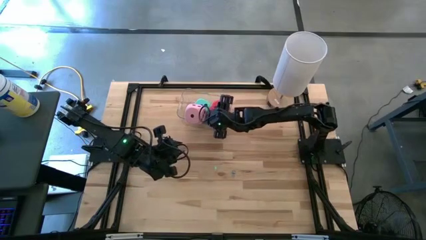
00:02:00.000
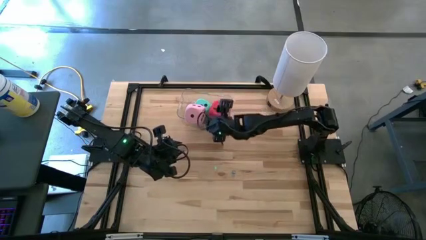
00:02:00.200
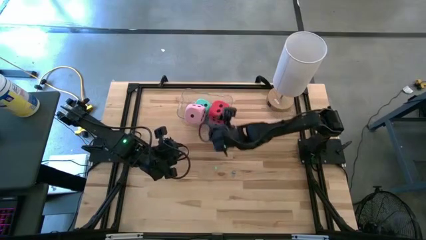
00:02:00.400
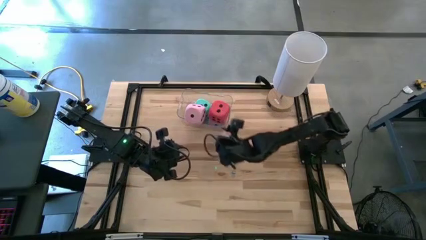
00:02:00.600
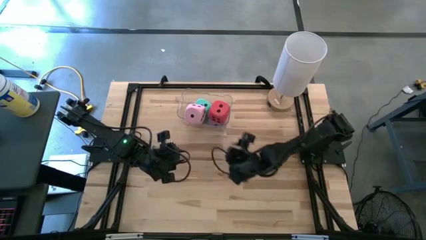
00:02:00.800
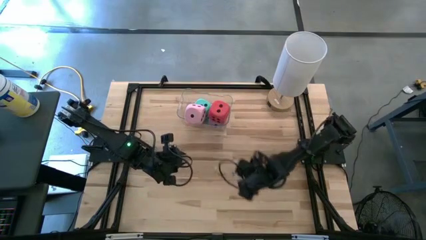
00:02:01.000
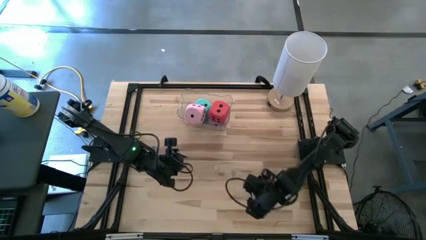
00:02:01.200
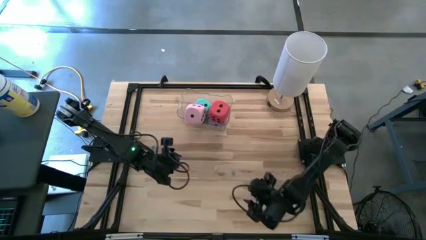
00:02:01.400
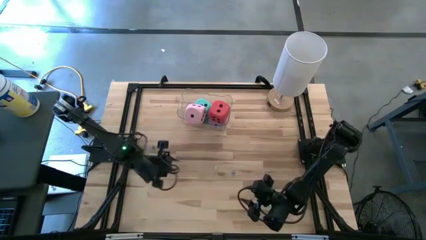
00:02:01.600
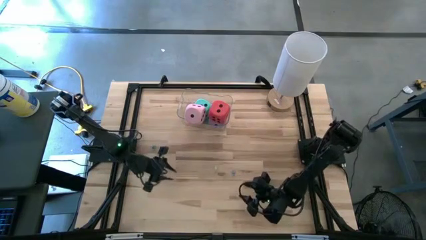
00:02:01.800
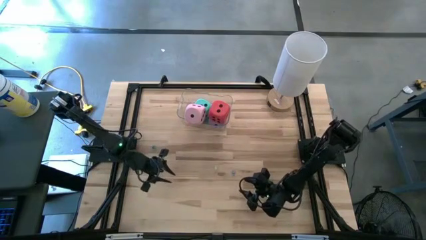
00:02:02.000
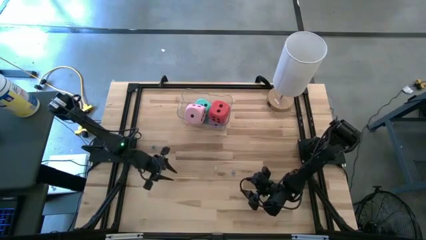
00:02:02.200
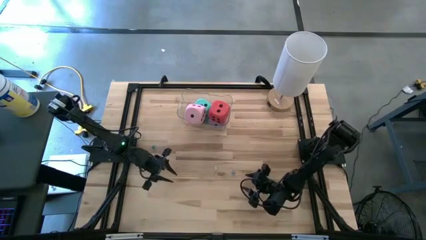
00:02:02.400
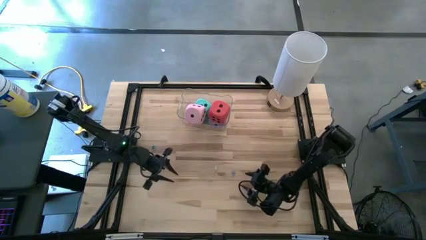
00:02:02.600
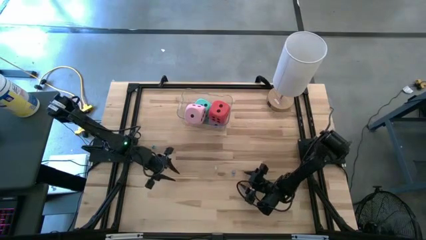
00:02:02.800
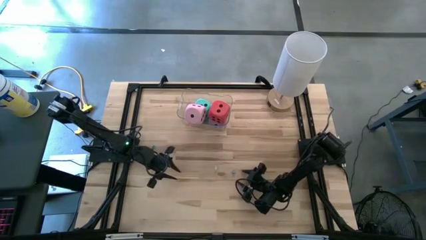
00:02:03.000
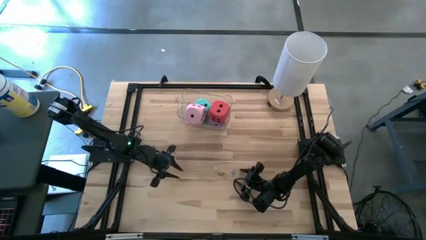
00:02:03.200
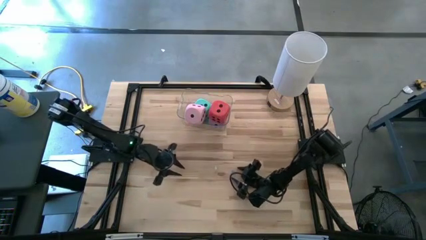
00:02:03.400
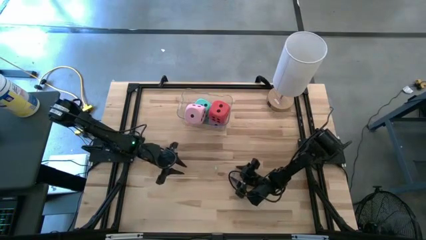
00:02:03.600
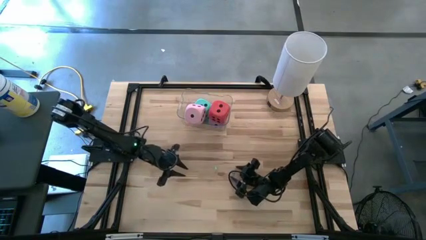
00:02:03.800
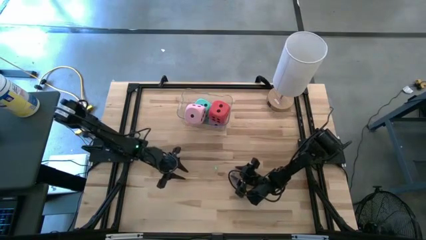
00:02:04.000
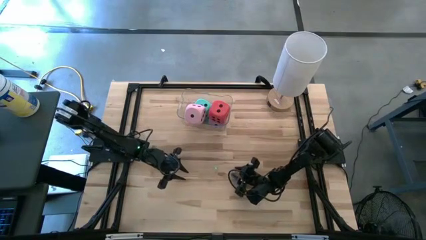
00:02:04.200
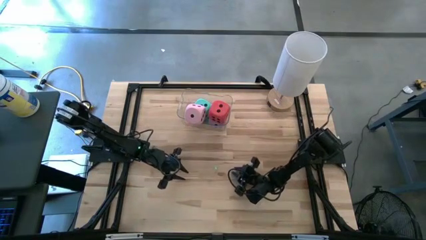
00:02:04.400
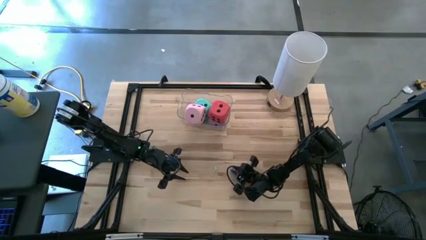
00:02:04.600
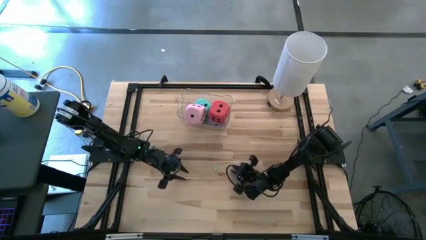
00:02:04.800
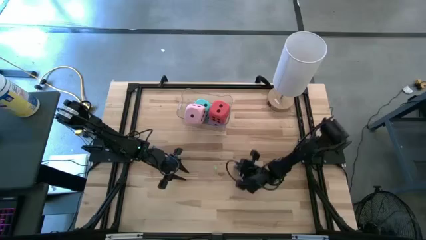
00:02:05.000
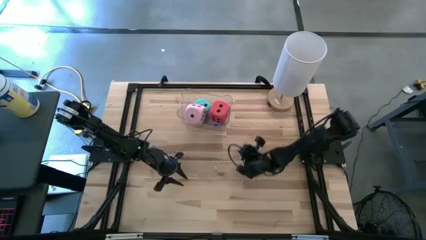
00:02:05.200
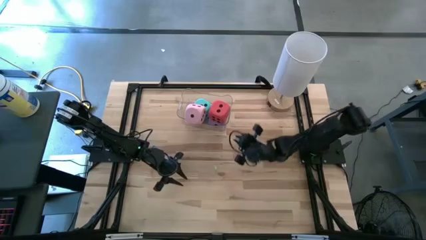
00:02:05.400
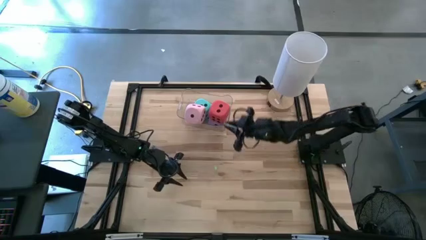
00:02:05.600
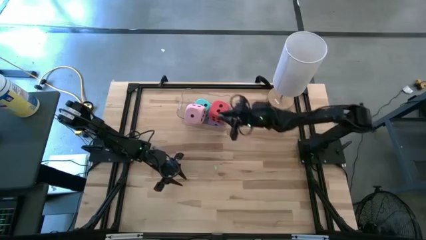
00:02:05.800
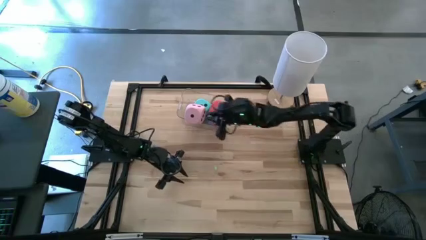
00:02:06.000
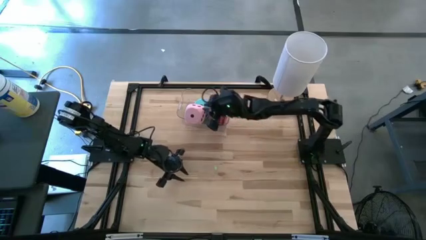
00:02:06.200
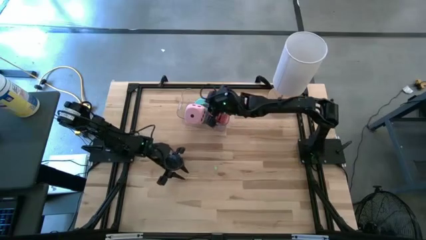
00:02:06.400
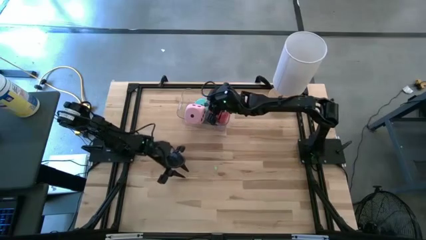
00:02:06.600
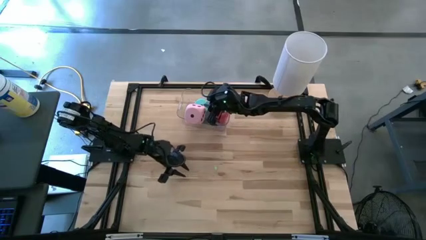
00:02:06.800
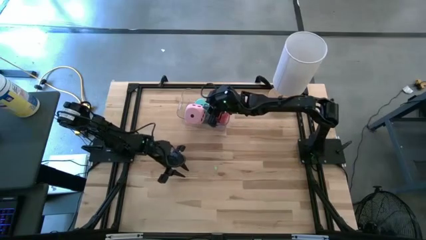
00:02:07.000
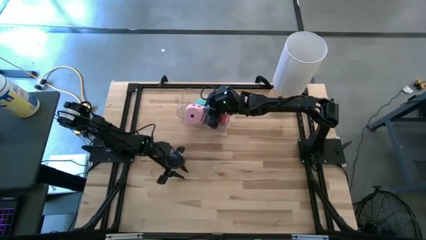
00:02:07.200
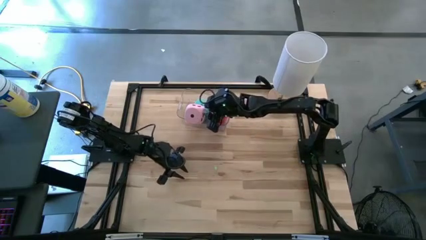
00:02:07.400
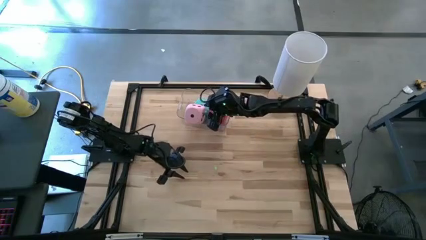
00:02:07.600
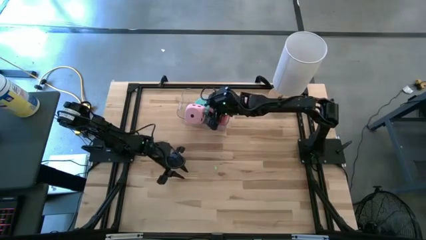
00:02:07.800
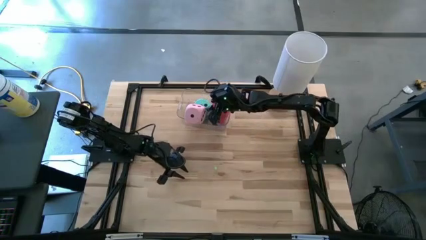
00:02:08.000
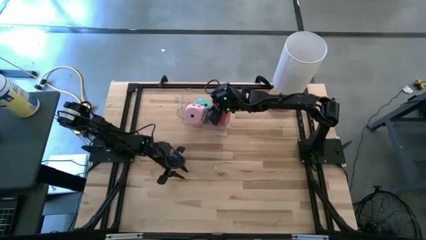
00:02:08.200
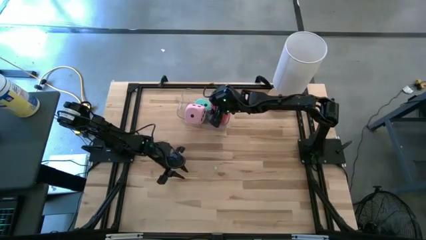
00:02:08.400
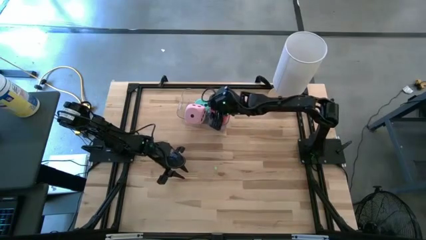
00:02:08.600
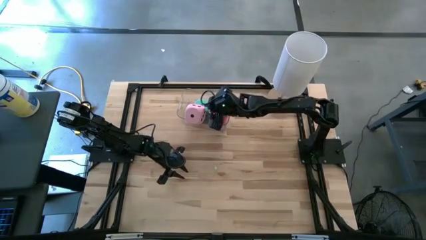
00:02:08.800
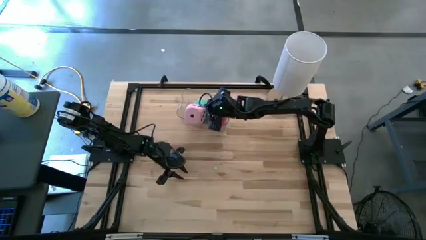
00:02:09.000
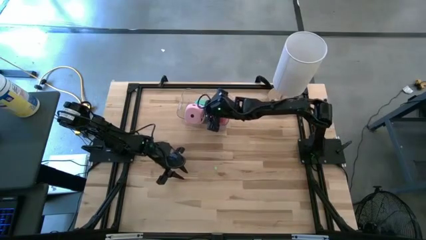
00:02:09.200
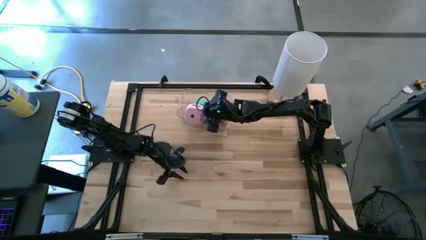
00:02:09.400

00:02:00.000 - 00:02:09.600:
Task: Pick & Place Dice
Put the blue dice into the transparent bin
